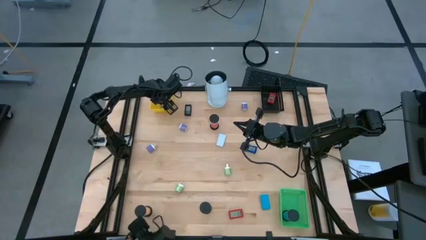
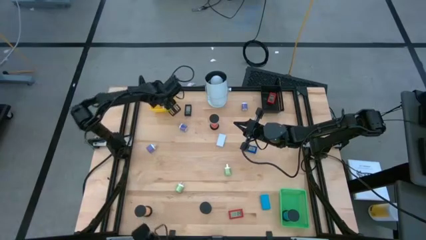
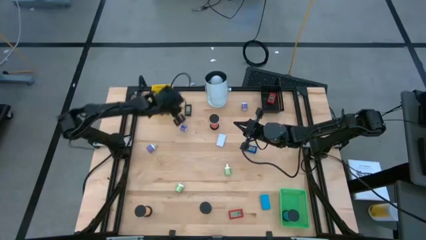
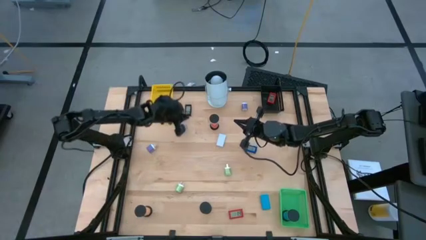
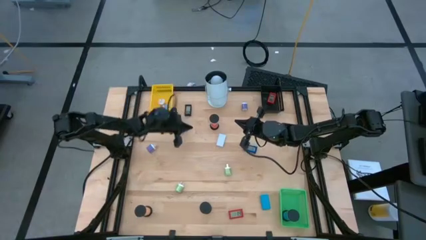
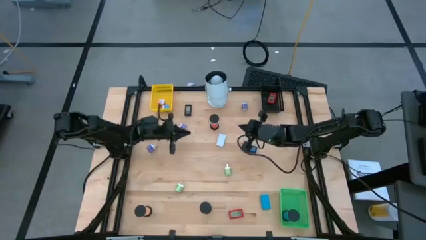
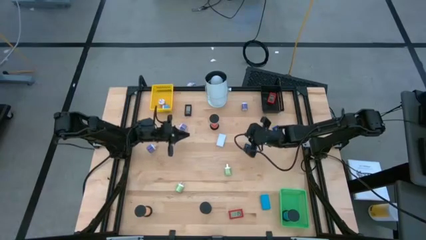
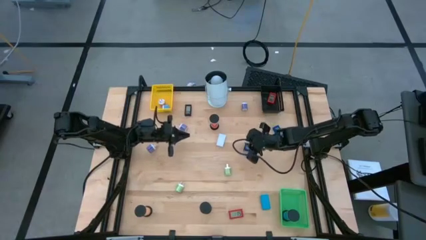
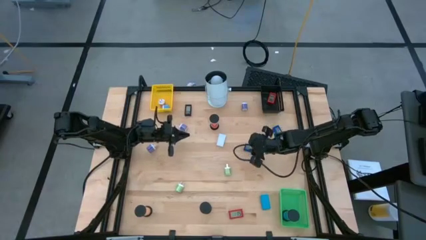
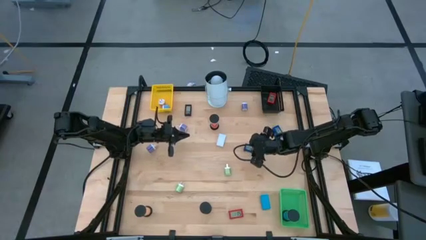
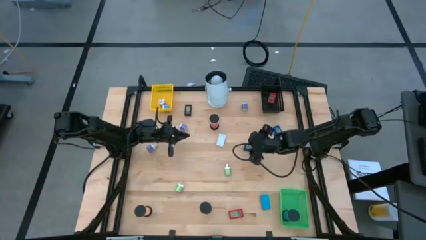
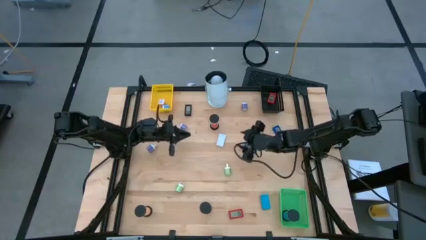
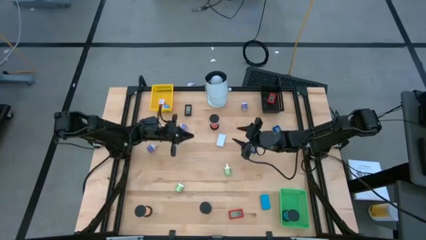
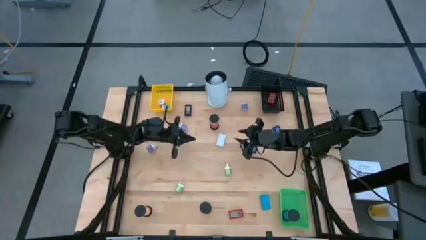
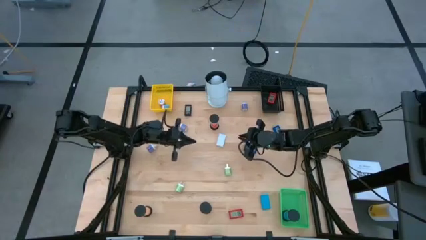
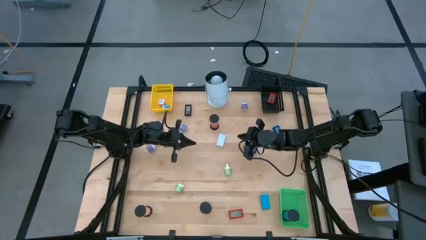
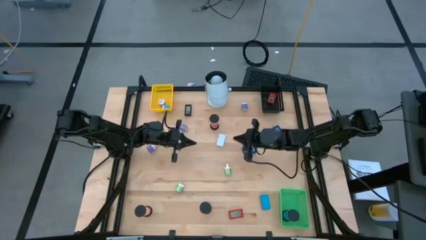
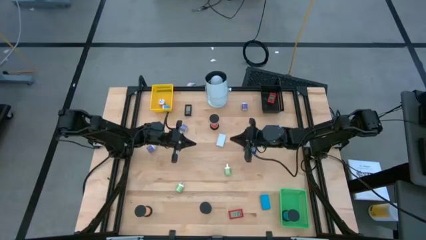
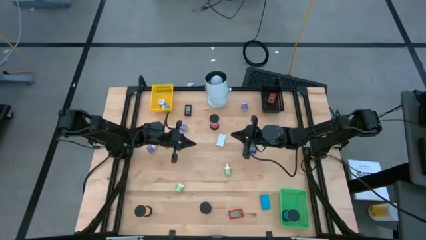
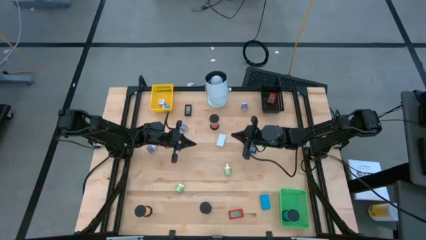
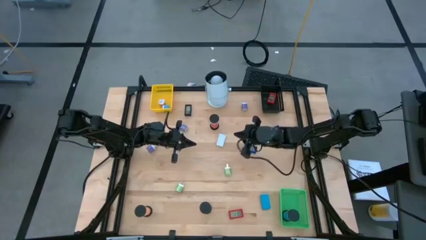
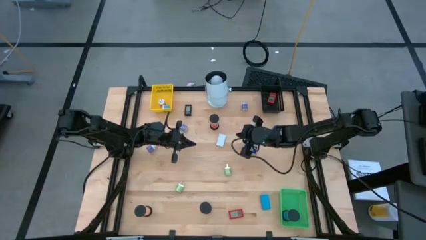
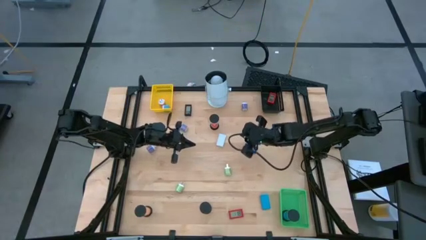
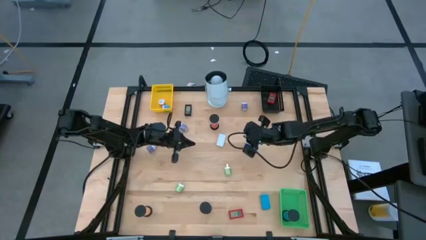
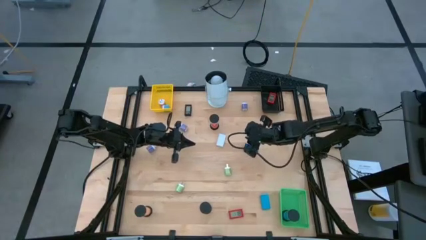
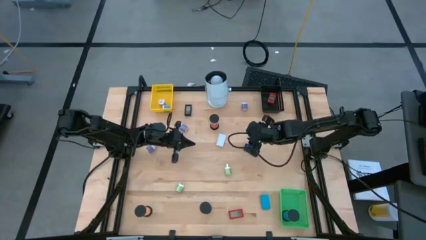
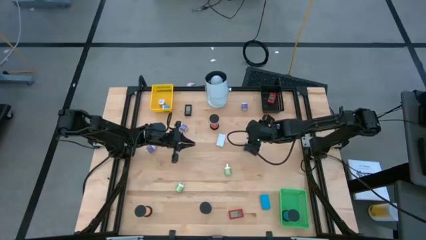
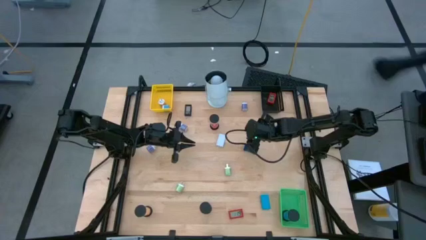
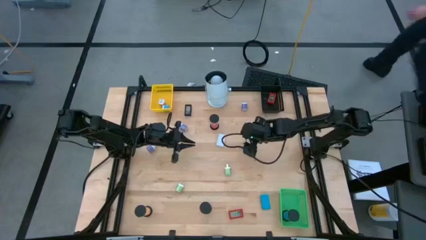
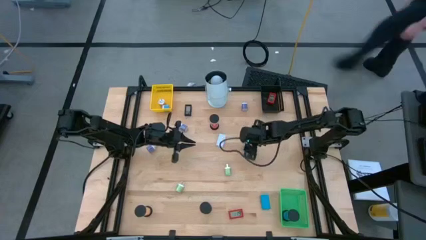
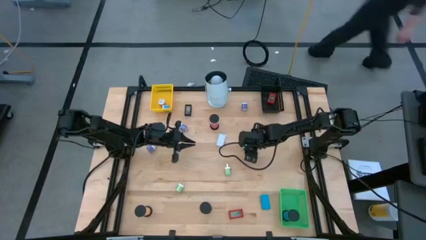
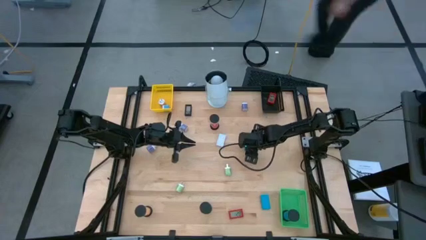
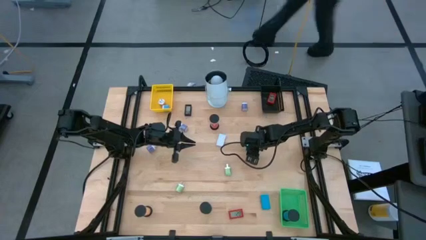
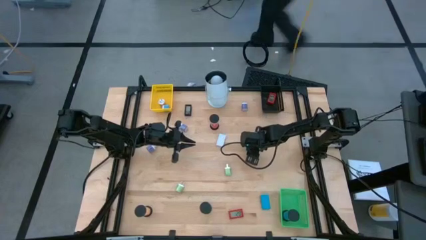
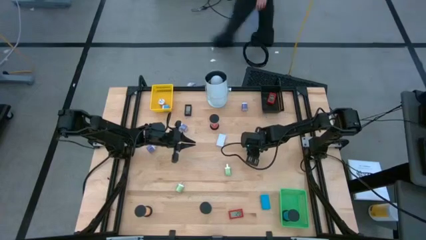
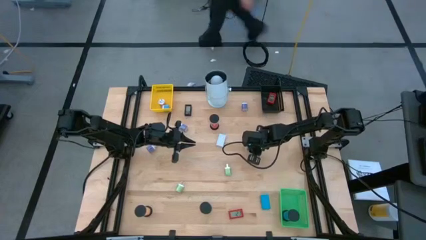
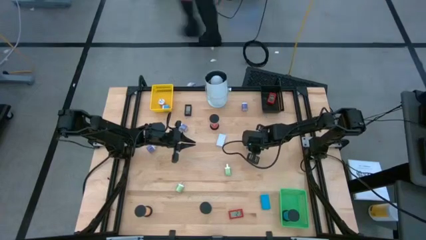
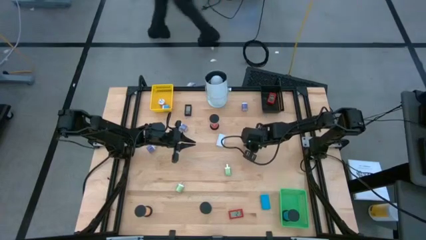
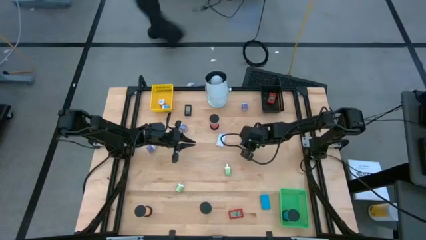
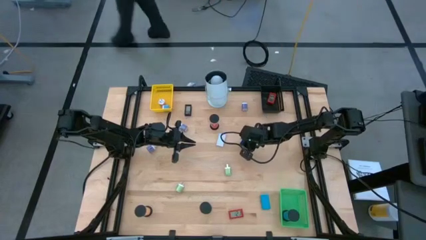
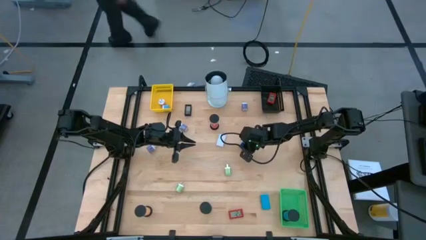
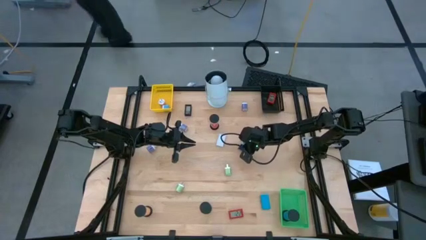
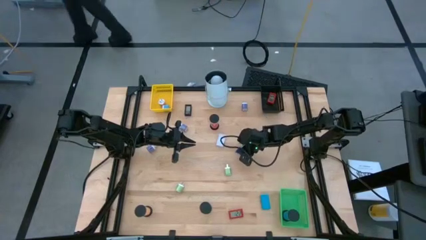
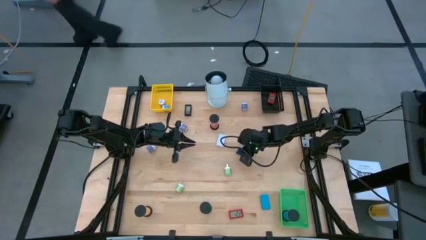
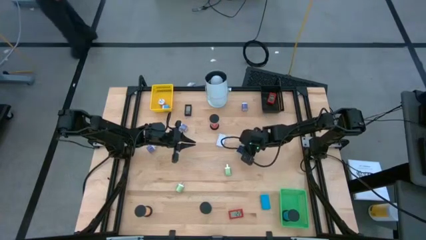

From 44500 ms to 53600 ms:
Task: Pick & Place Office items
Put the blue timer into the black bin

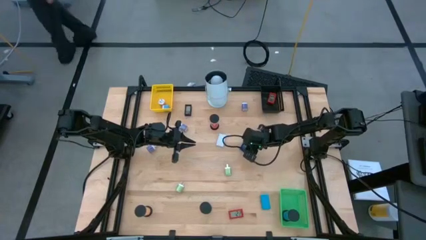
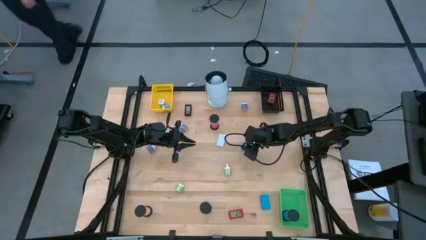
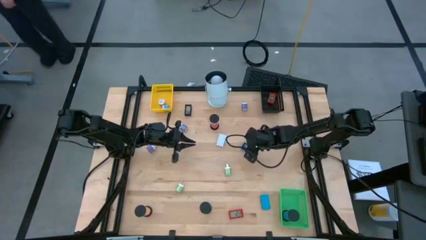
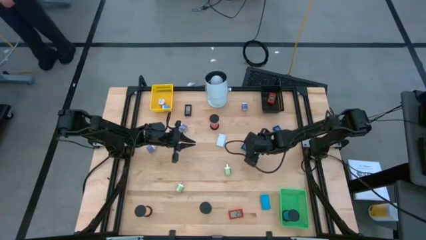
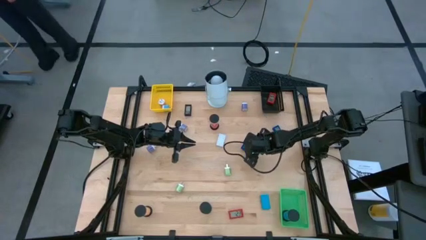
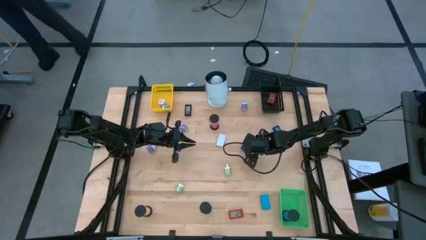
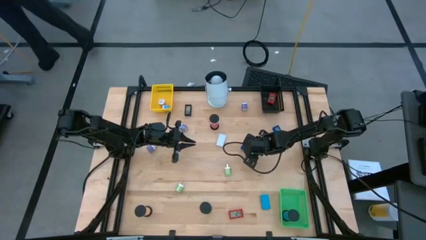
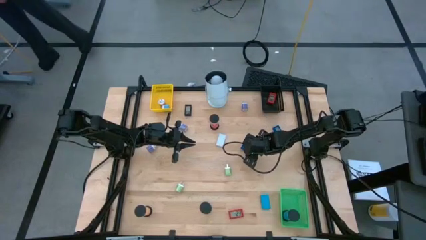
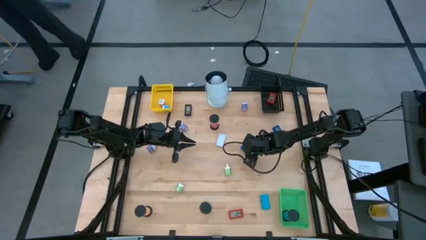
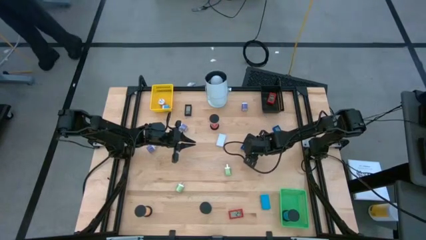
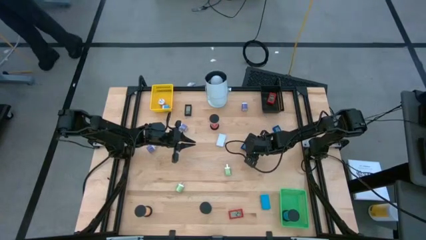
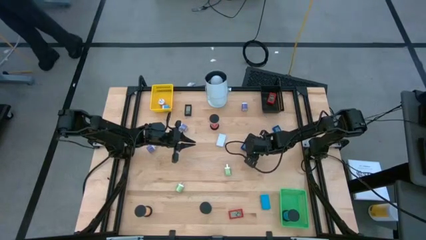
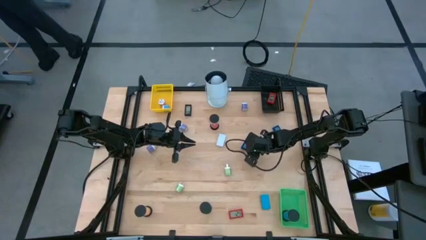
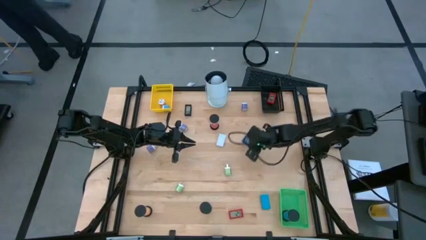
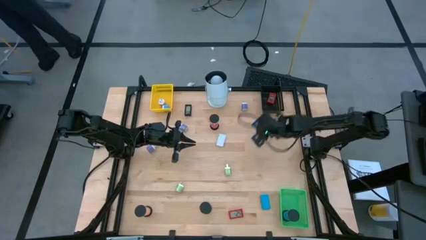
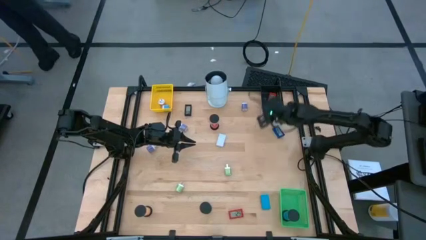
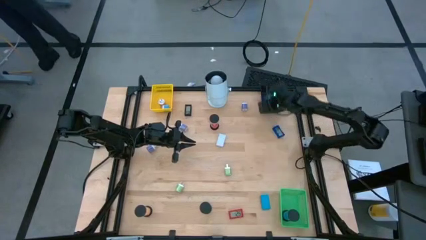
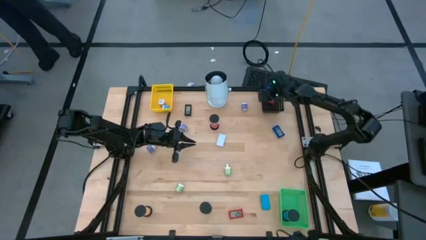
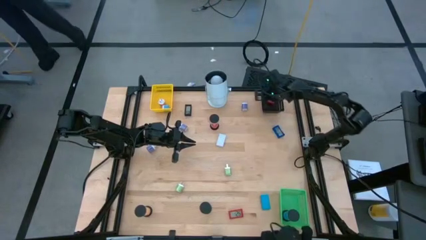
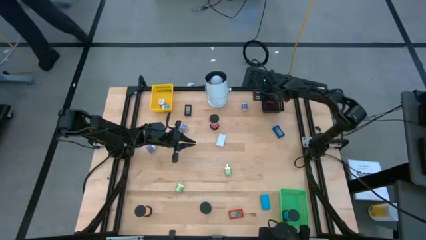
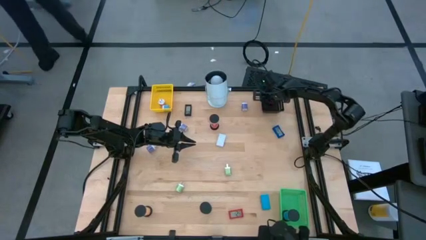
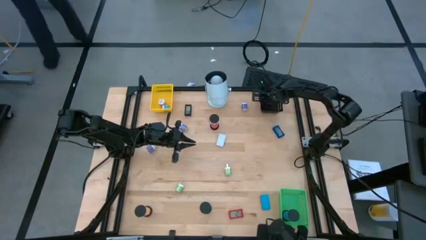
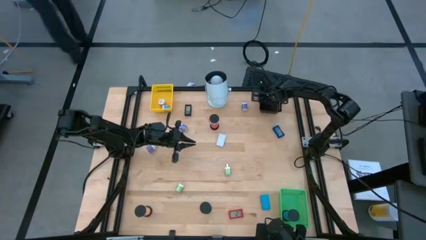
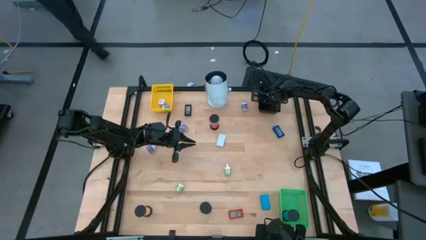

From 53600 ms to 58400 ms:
Put the blue timer into the black bin

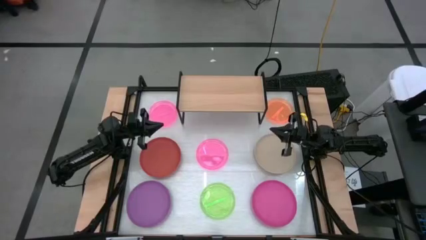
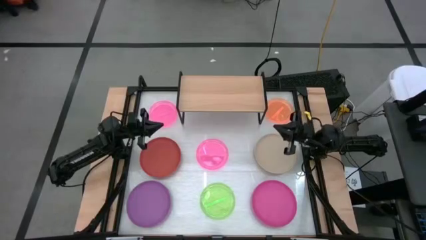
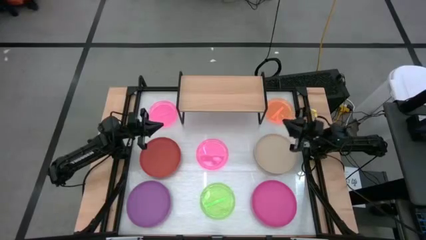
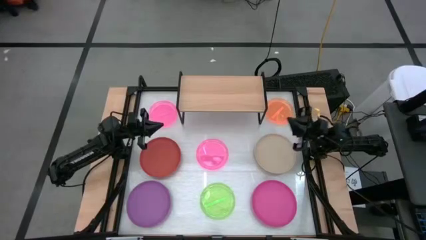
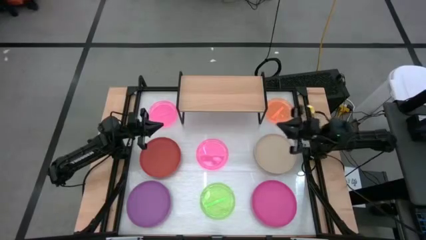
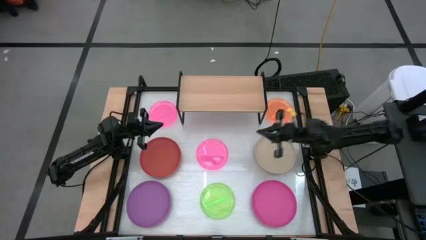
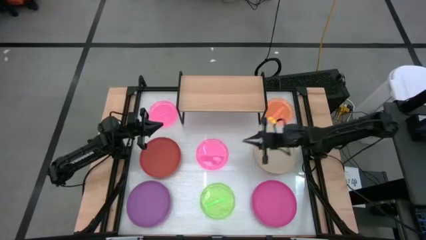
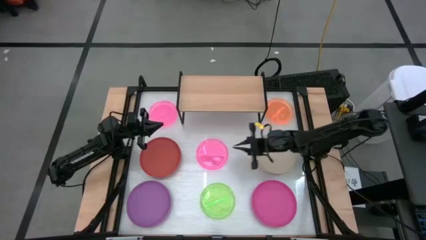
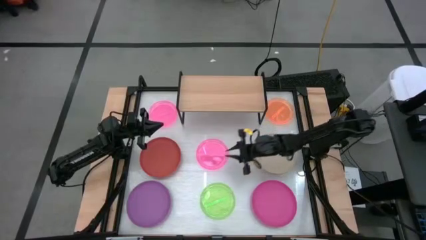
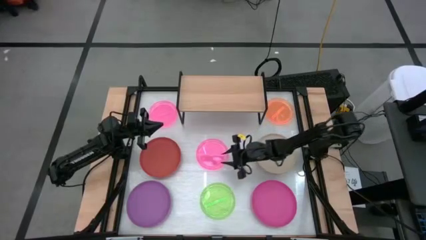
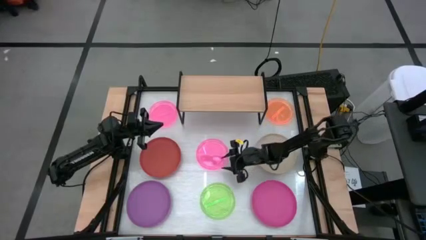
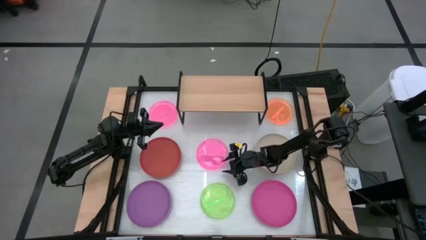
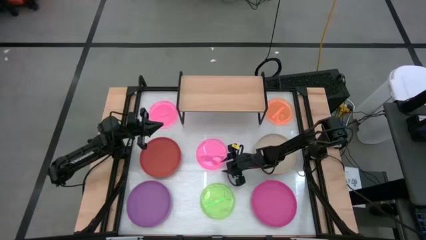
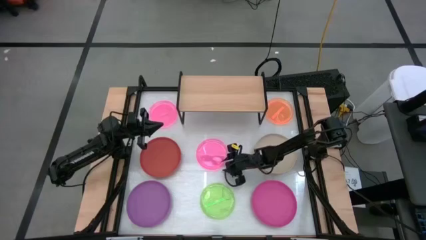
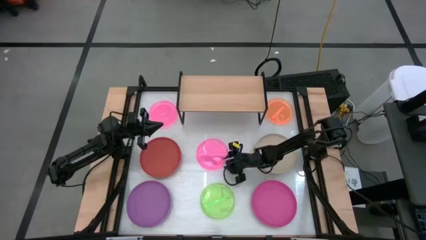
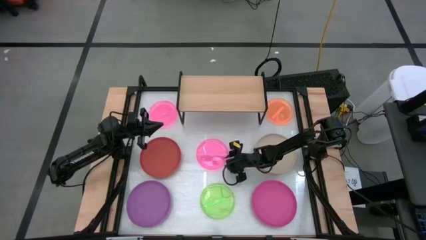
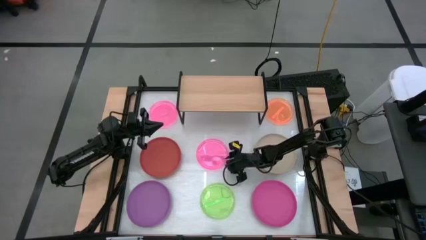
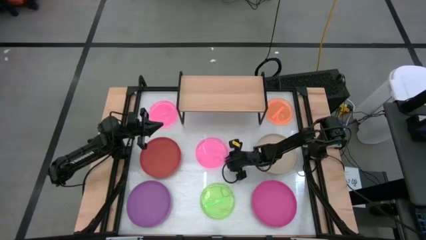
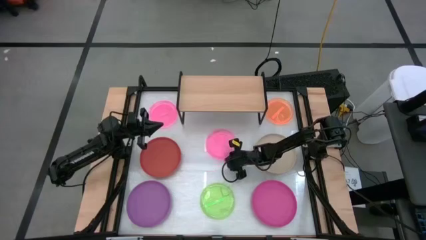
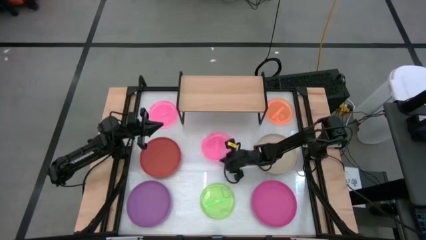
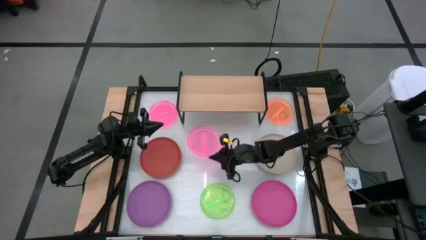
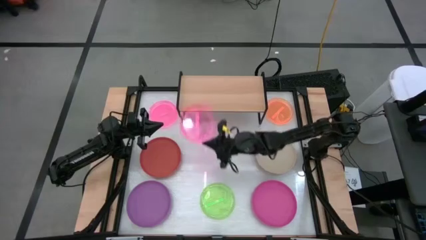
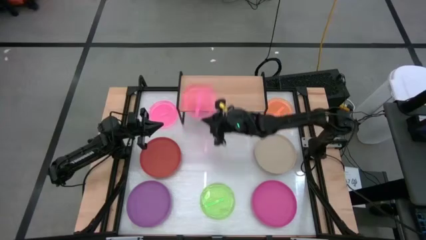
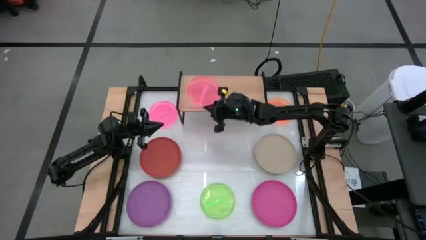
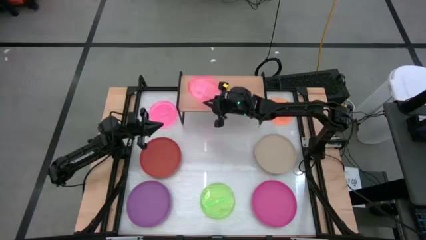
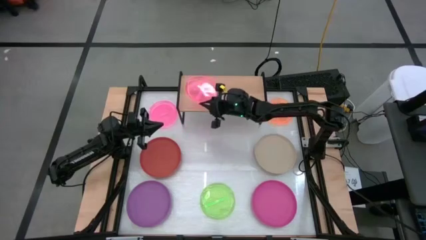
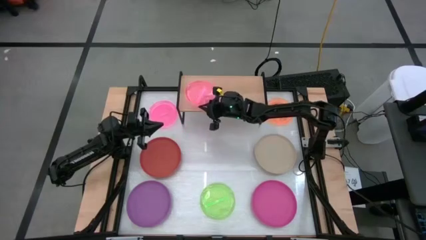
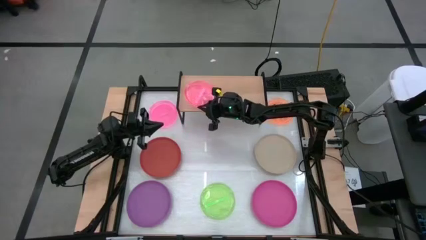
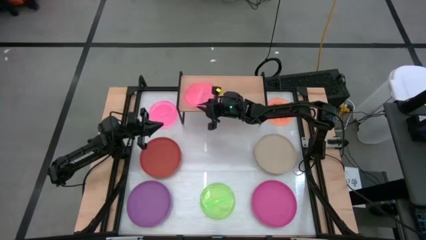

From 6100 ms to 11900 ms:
Task: Place and stack plates onto a shelf
Put the small bottom pink plate on the shelf
